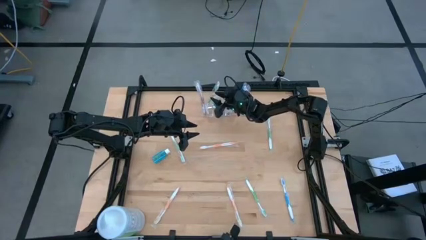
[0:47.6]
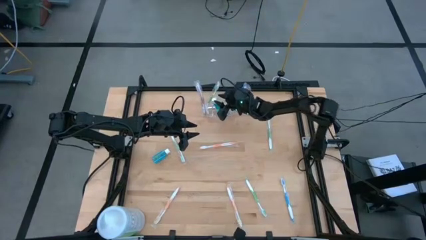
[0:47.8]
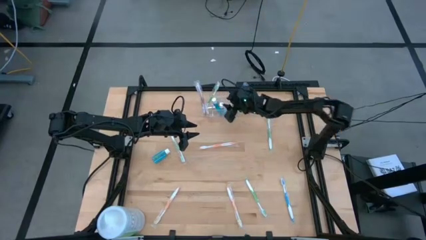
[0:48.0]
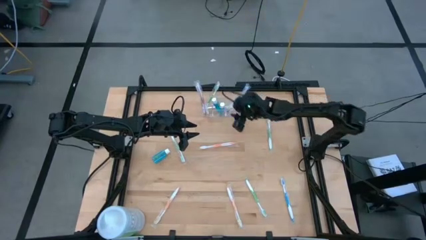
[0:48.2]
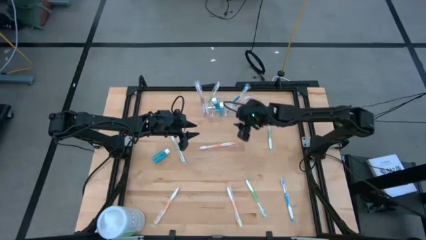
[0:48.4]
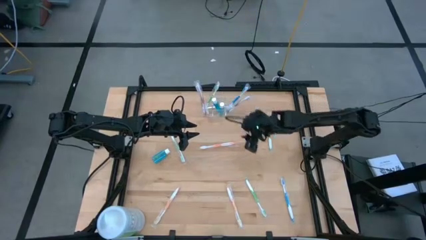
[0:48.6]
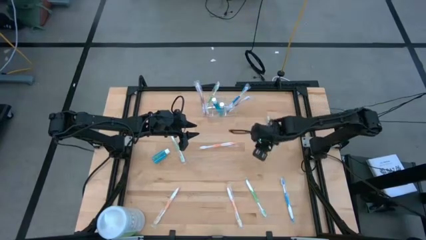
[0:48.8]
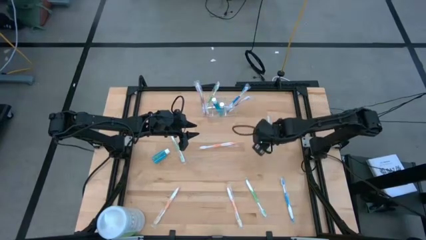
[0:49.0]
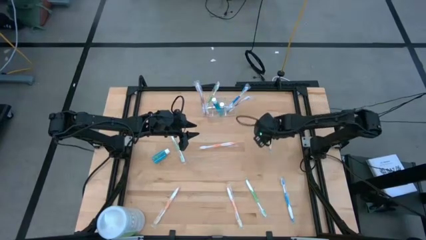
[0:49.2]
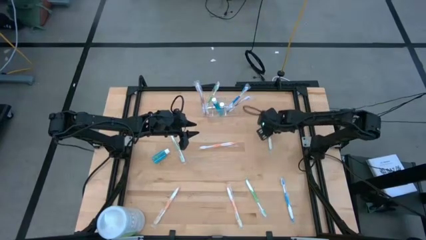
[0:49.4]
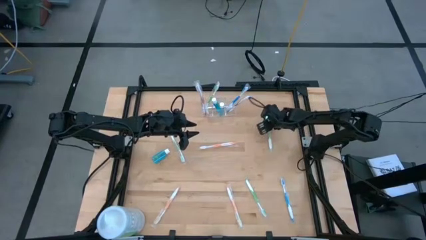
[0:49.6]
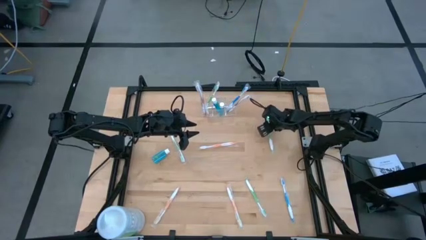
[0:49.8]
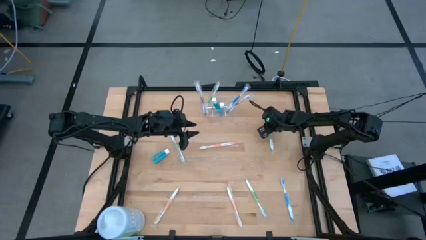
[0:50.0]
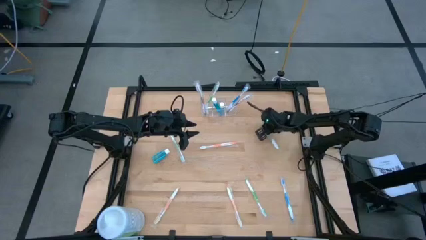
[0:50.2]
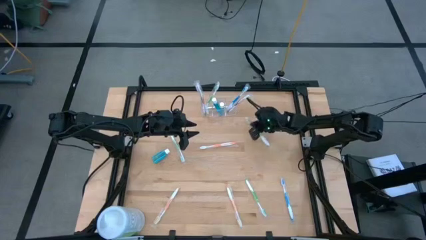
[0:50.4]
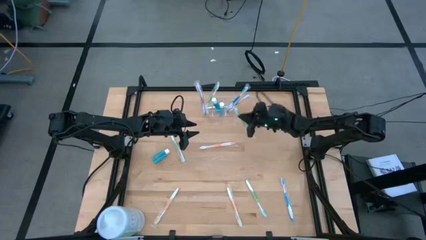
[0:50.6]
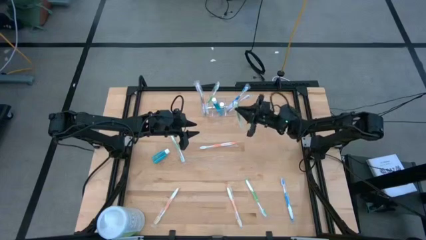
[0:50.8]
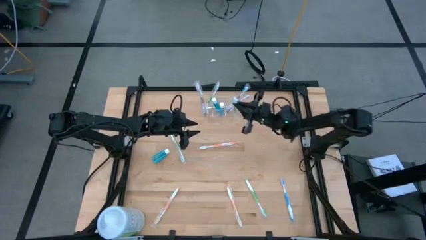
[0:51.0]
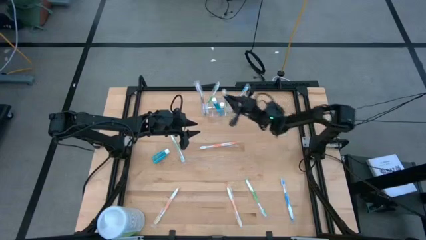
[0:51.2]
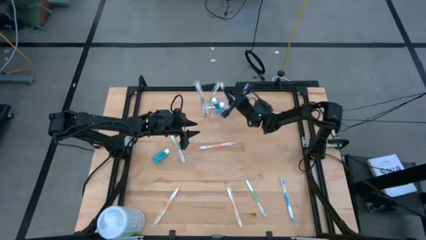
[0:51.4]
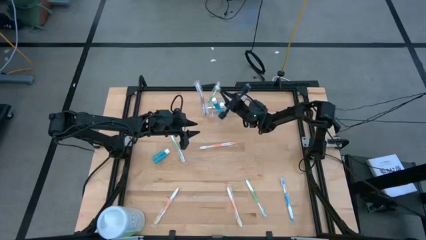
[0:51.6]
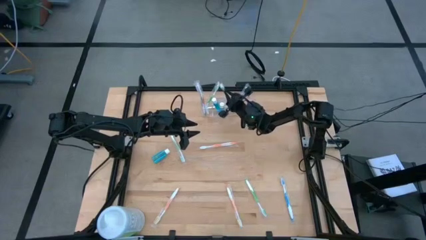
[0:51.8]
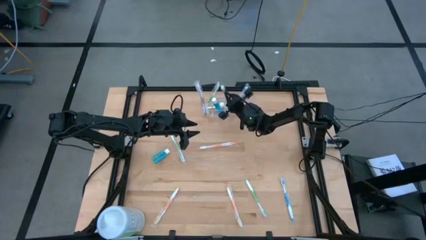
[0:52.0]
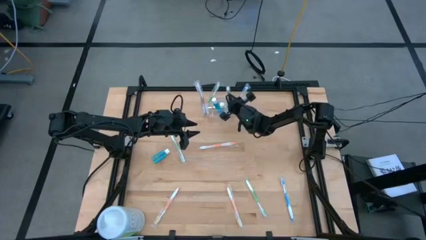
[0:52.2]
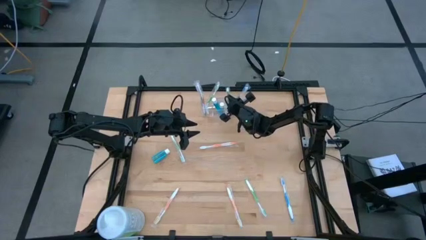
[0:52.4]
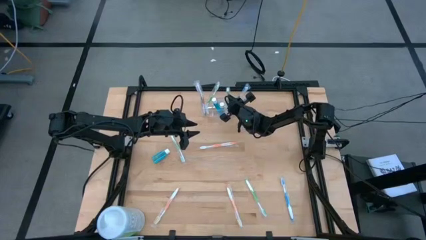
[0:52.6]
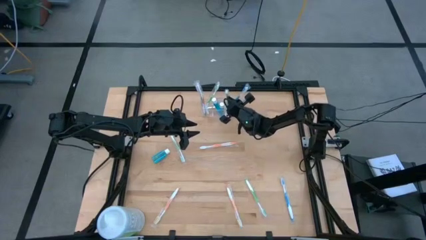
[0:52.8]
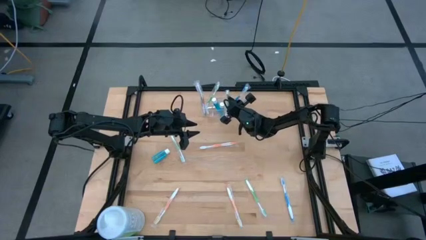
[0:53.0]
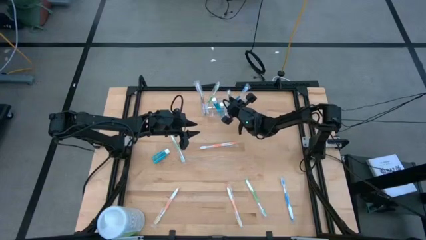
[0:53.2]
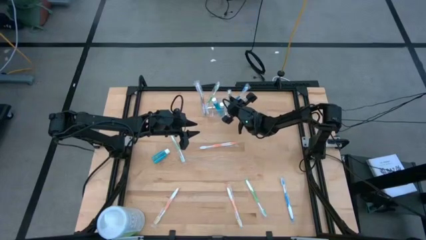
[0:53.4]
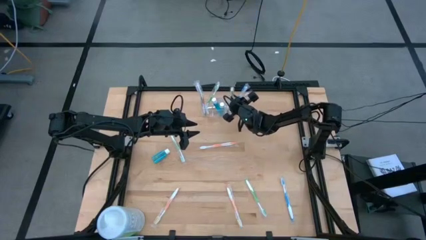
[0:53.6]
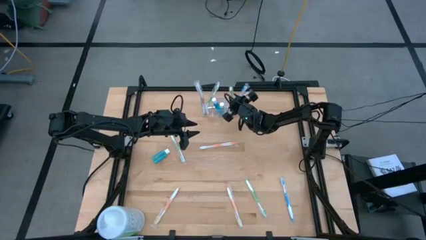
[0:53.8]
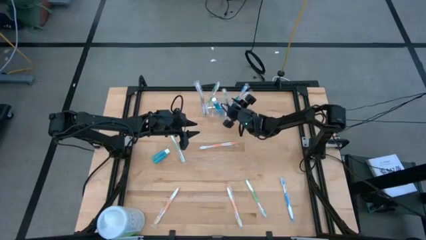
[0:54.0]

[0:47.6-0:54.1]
Task: Pick & Place toothbrushing station
Put the green toothbrush into the transparent organizer

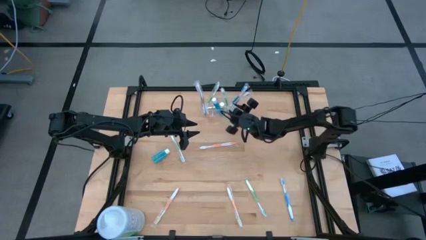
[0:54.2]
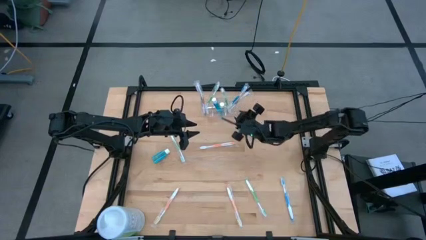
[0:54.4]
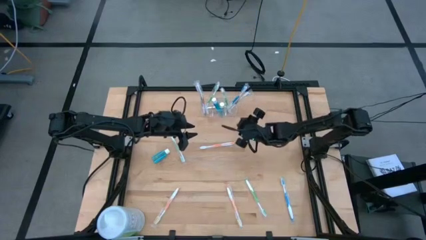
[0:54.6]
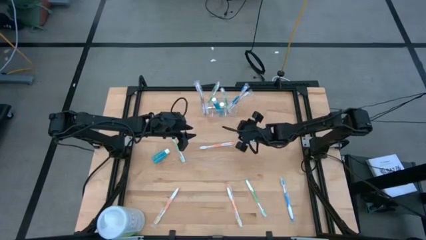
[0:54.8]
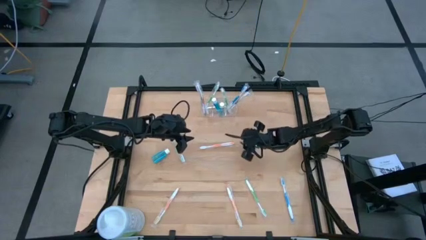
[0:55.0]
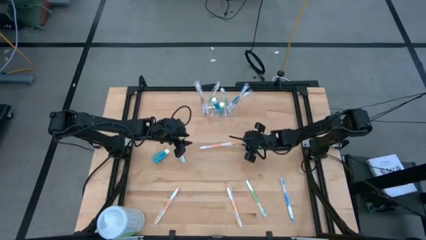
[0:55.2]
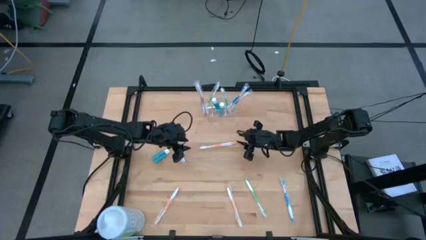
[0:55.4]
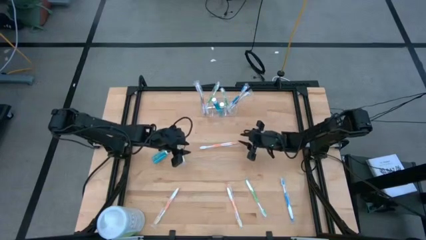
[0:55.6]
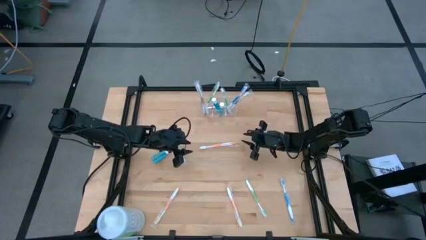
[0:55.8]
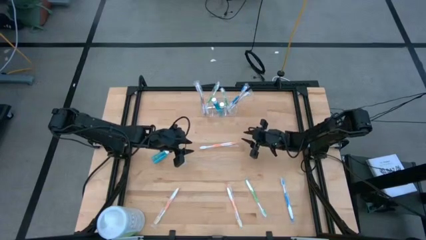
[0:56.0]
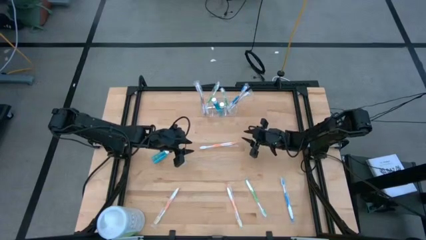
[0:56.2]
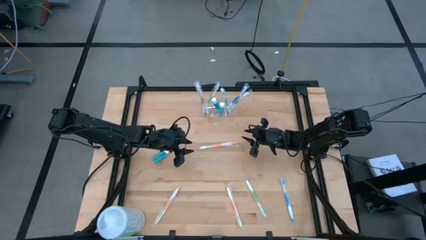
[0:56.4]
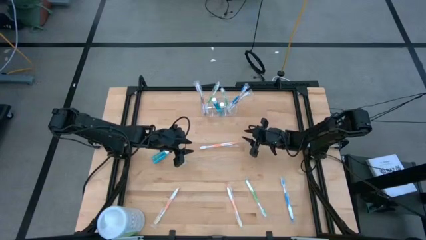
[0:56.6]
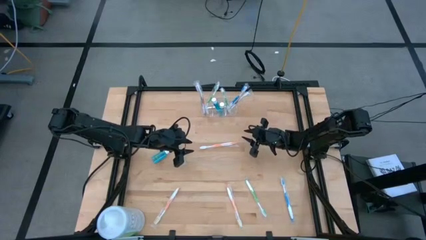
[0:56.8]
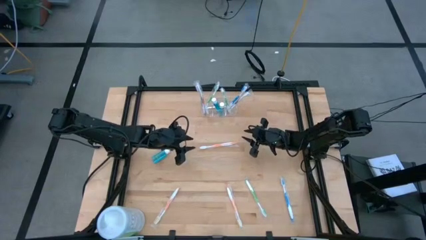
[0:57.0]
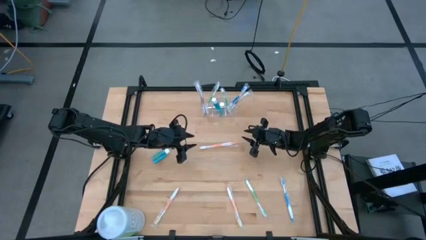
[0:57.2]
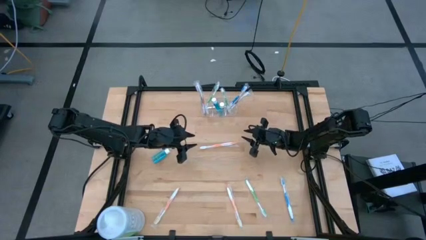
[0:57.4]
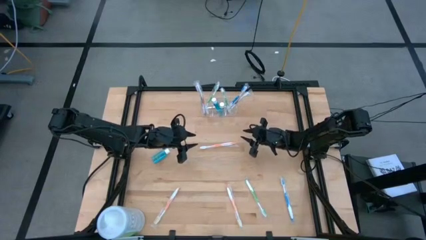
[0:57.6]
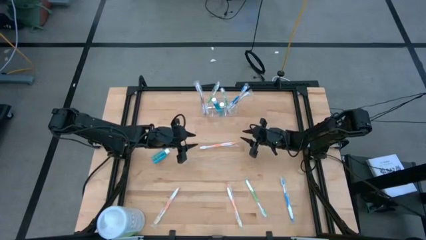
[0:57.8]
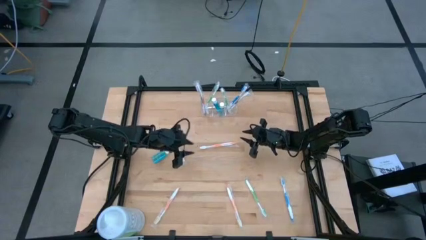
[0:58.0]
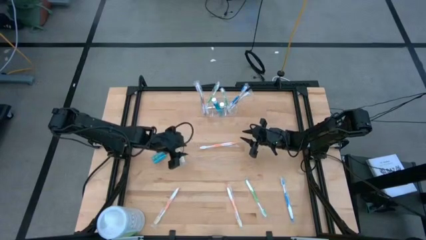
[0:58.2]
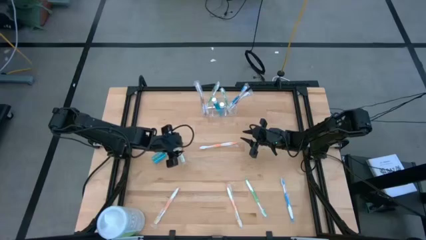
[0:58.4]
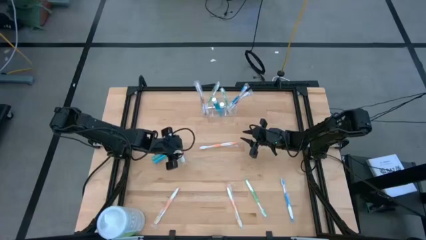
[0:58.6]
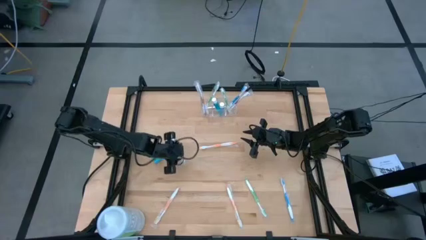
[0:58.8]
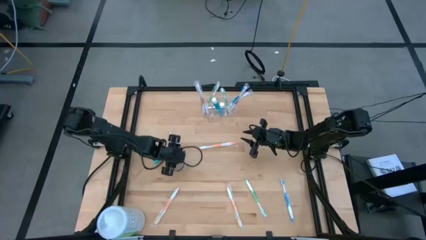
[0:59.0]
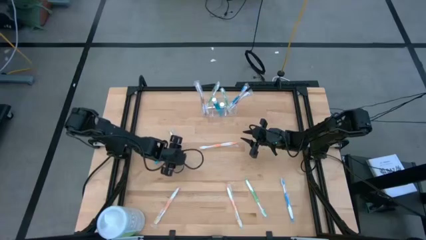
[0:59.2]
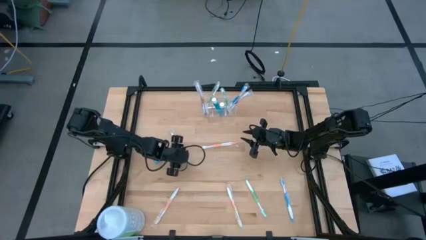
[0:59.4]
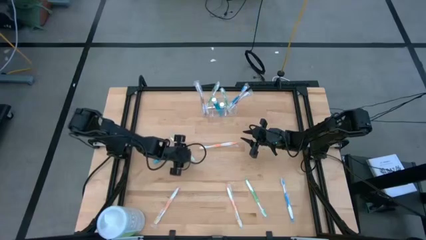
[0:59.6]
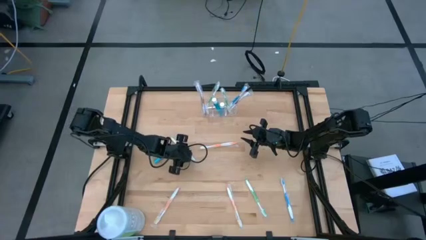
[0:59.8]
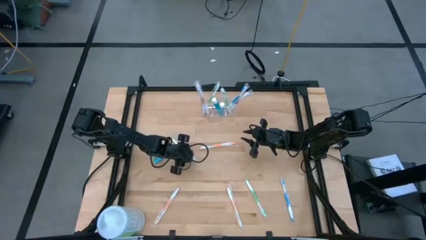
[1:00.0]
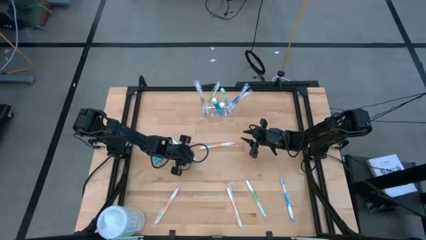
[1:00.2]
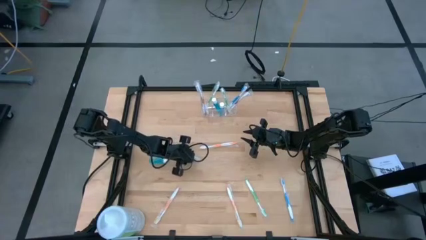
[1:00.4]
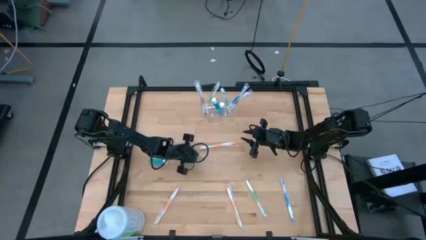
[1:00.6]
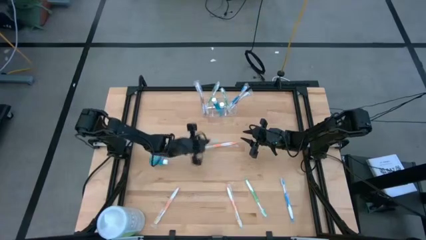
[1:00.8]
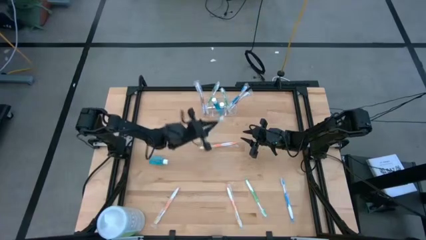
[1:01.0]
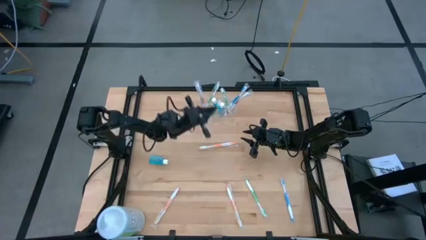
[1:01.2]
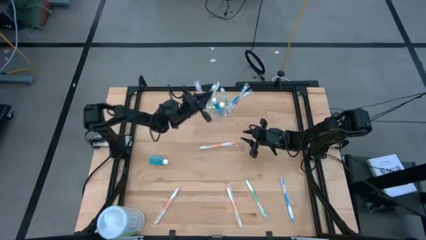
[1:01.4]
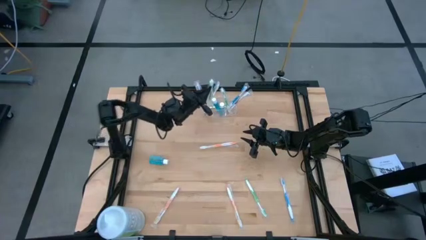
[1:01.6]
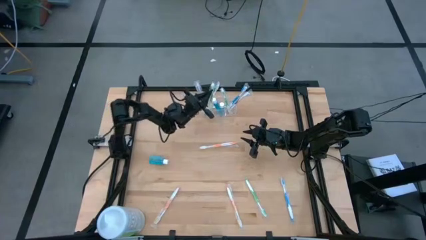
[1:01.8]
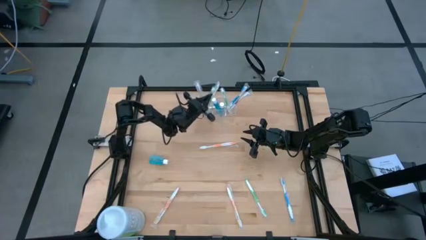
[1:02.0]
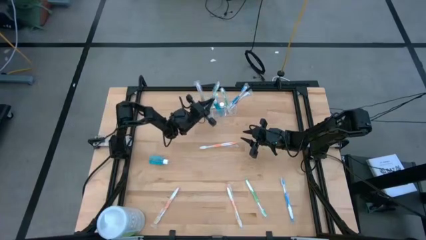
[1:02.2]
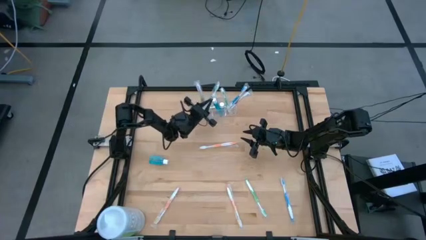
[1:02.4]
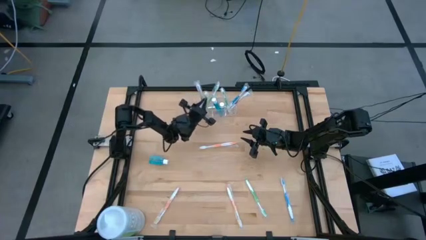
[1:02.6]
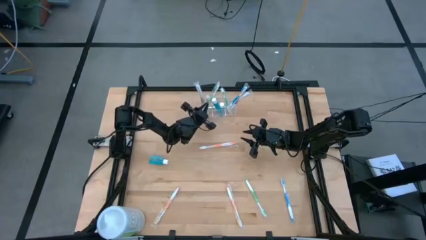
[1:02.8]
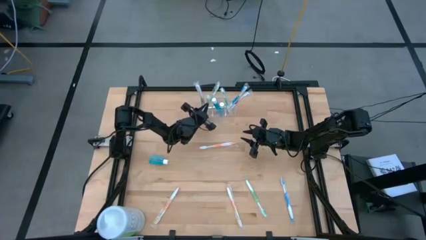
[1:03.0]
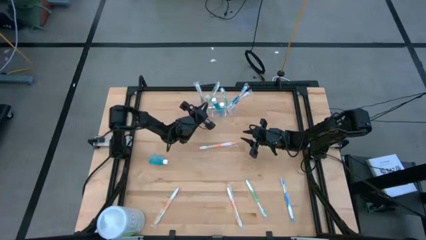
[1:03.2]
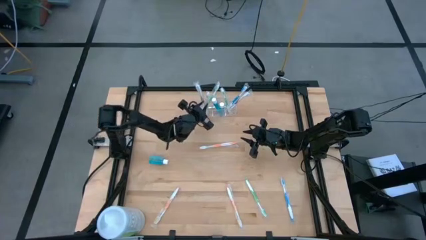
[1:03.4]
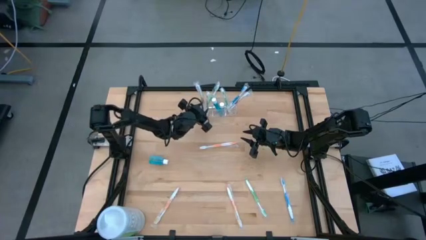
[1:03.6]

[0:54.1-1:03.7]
Put the green toothbrush into the transparent organizer
